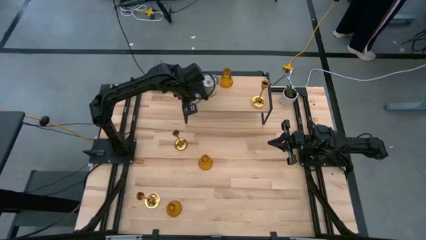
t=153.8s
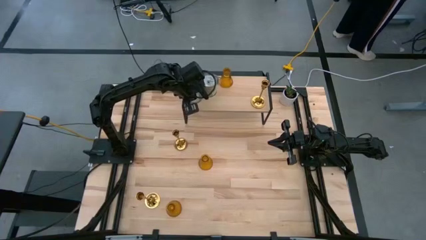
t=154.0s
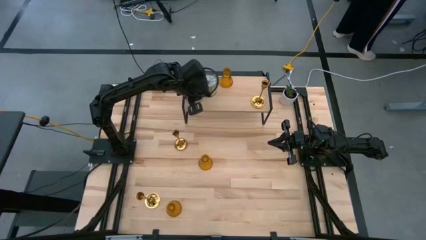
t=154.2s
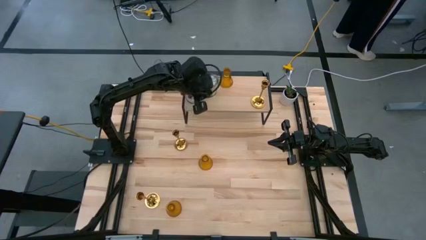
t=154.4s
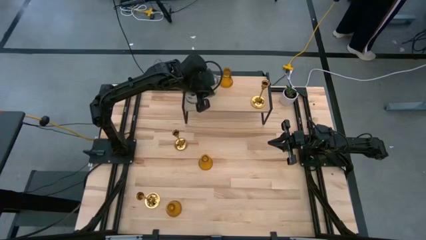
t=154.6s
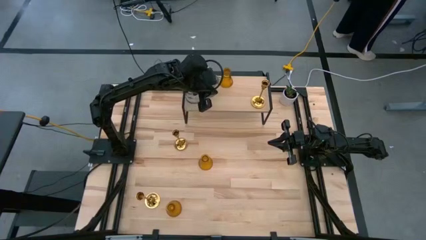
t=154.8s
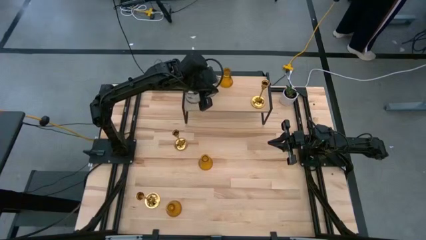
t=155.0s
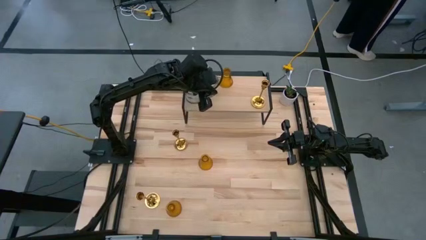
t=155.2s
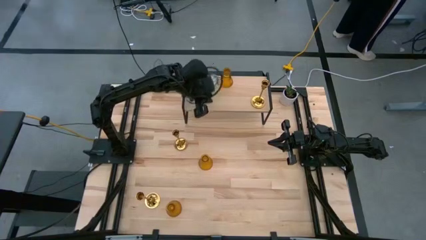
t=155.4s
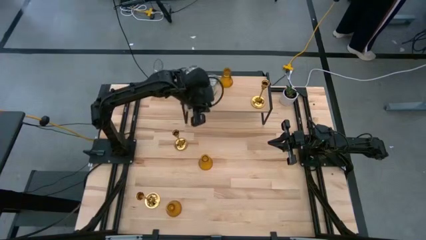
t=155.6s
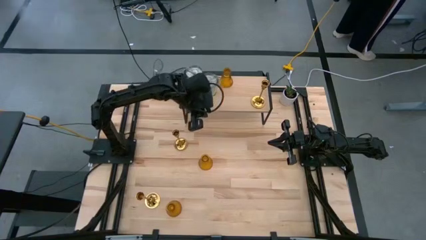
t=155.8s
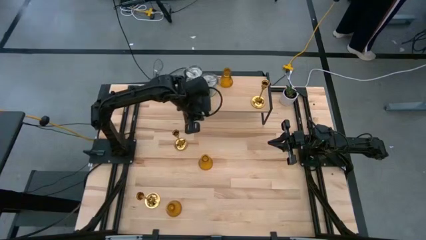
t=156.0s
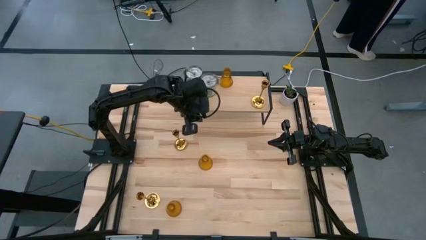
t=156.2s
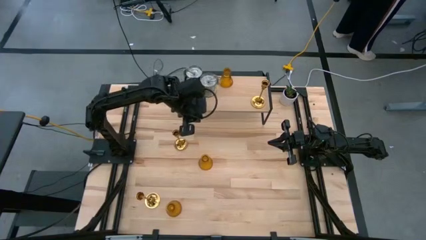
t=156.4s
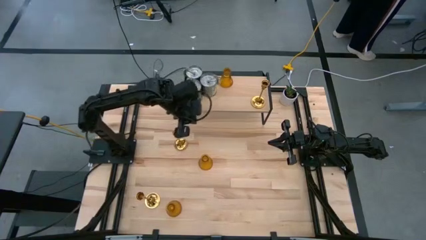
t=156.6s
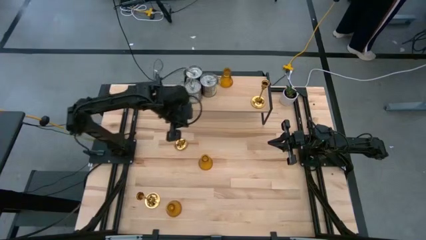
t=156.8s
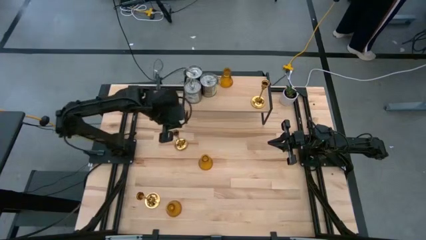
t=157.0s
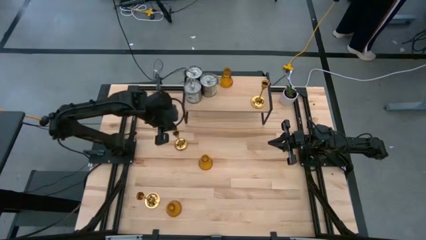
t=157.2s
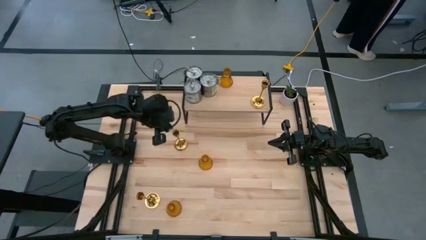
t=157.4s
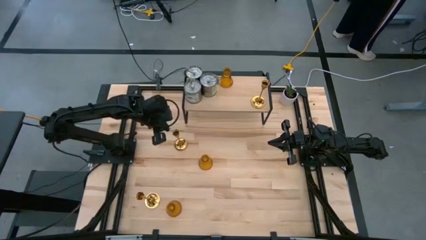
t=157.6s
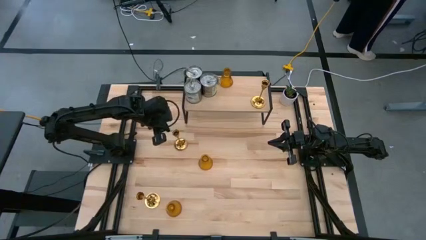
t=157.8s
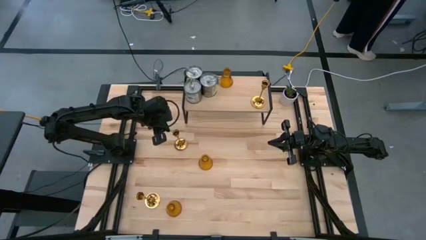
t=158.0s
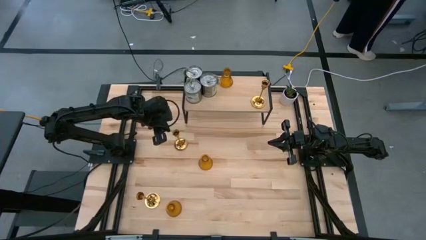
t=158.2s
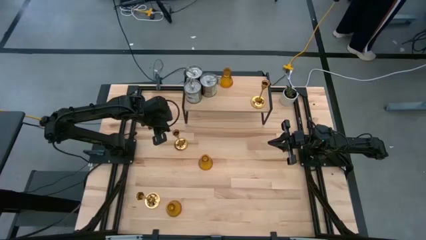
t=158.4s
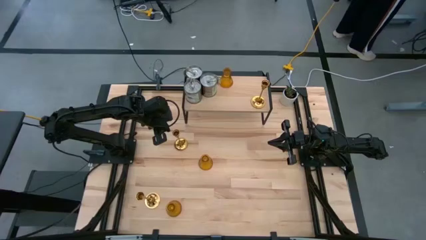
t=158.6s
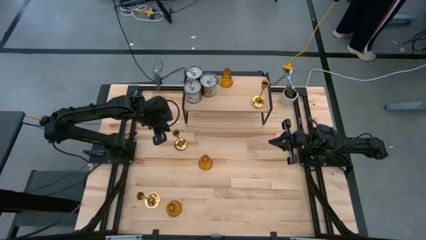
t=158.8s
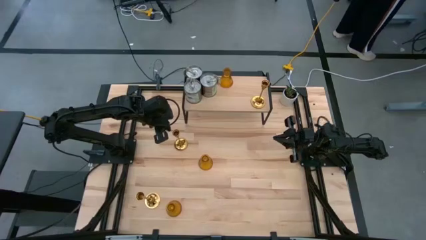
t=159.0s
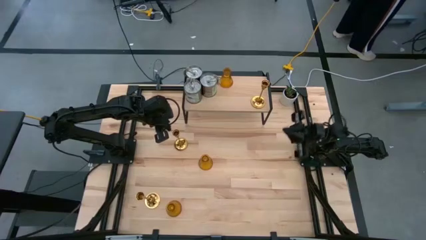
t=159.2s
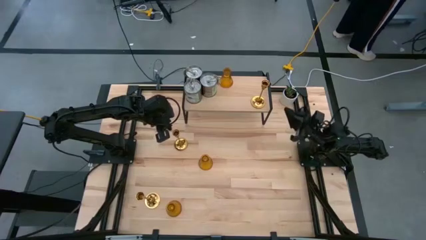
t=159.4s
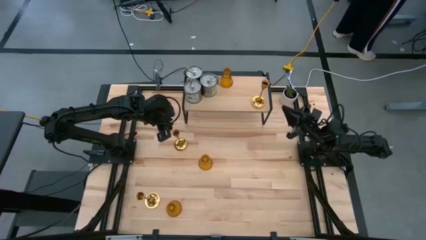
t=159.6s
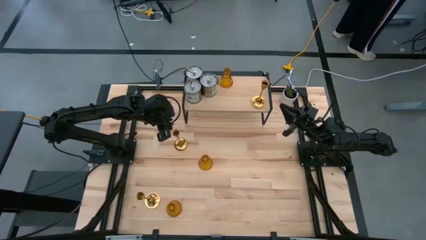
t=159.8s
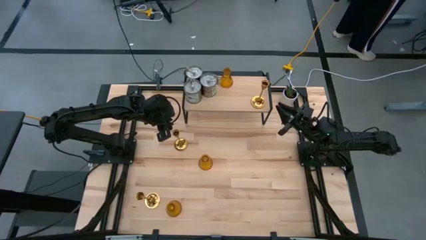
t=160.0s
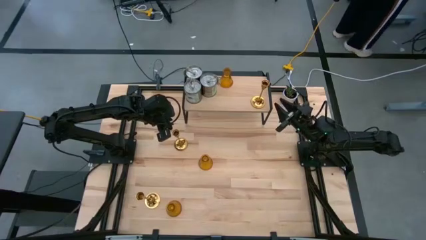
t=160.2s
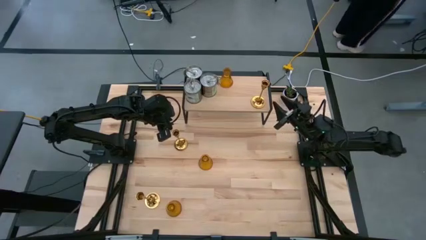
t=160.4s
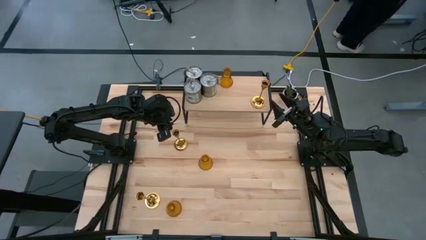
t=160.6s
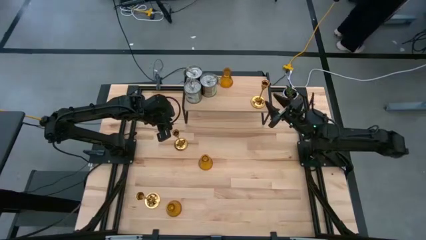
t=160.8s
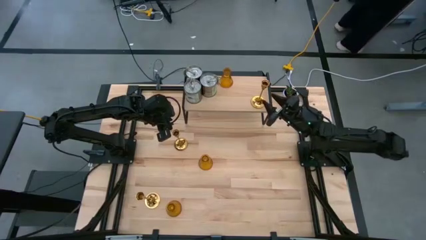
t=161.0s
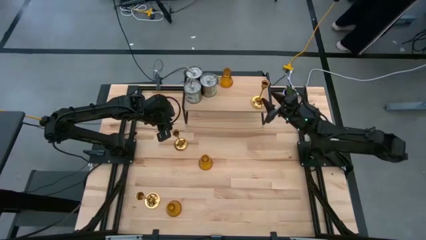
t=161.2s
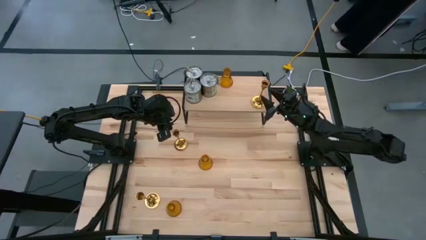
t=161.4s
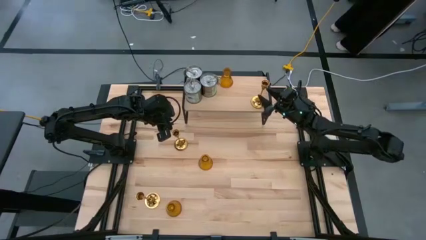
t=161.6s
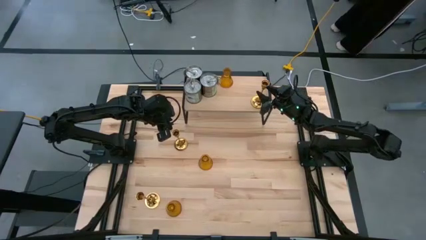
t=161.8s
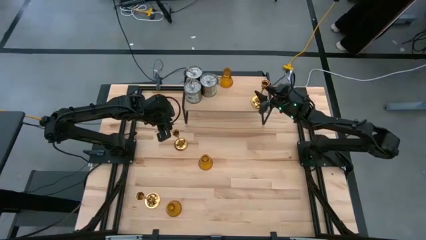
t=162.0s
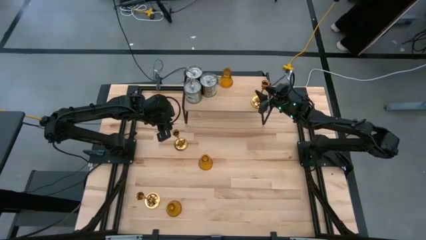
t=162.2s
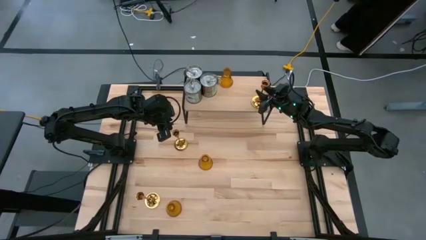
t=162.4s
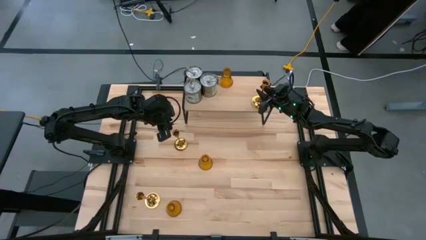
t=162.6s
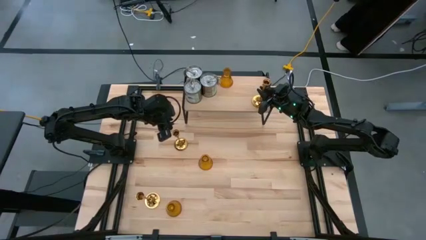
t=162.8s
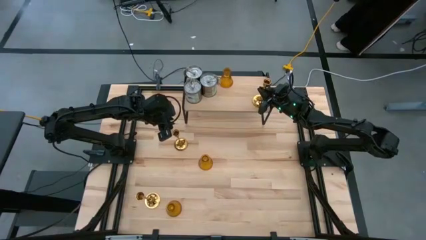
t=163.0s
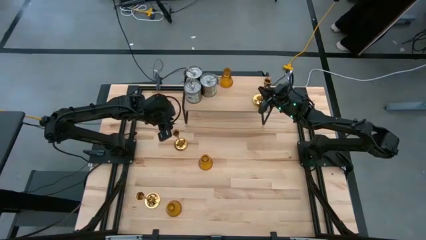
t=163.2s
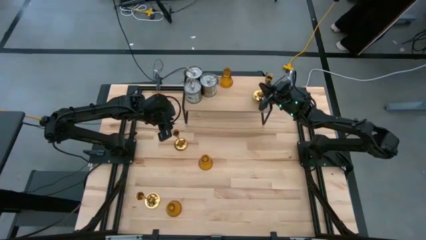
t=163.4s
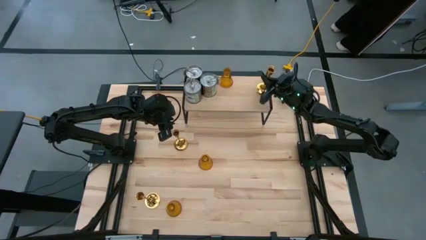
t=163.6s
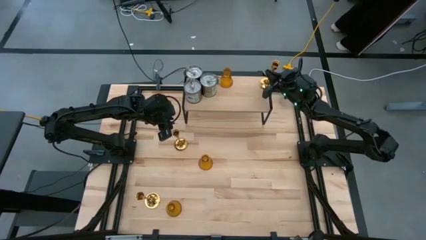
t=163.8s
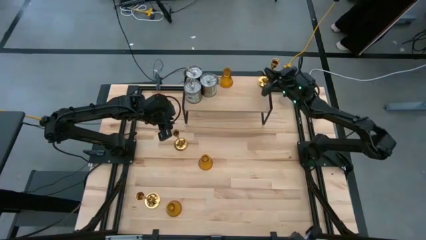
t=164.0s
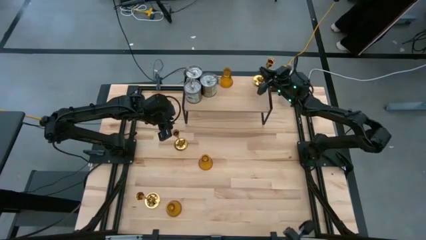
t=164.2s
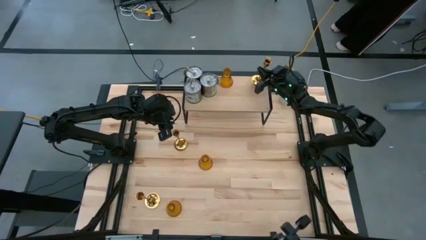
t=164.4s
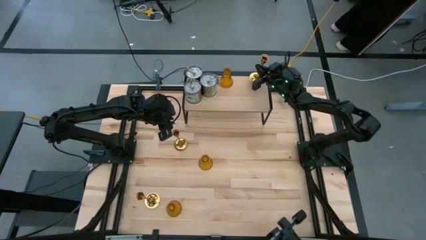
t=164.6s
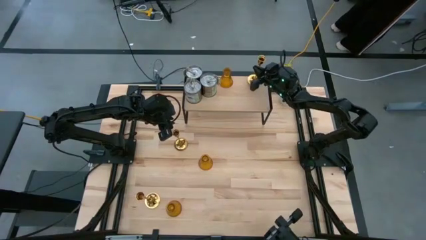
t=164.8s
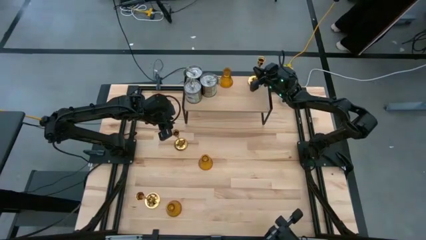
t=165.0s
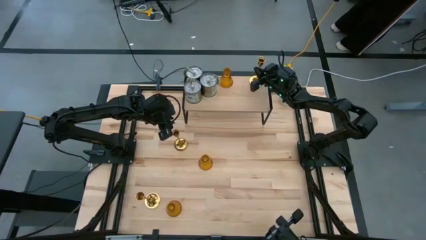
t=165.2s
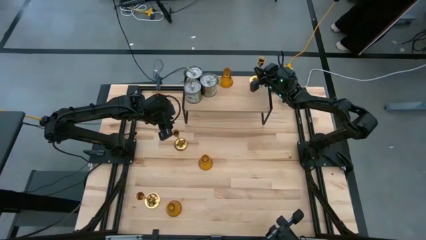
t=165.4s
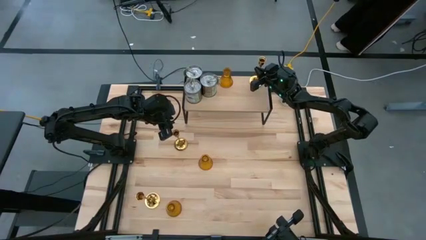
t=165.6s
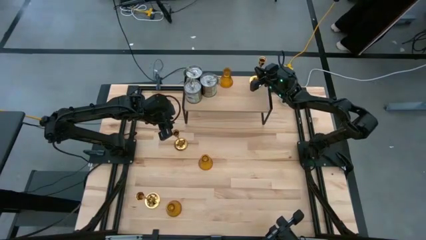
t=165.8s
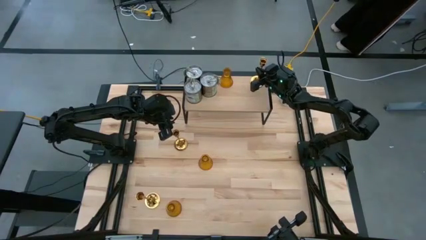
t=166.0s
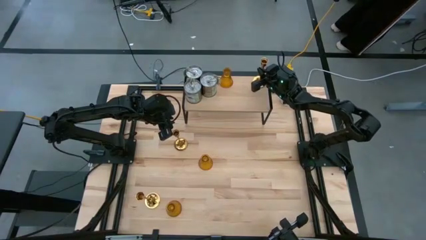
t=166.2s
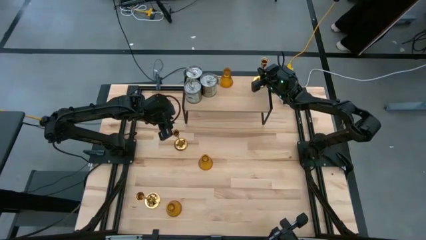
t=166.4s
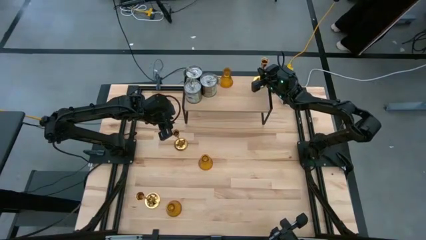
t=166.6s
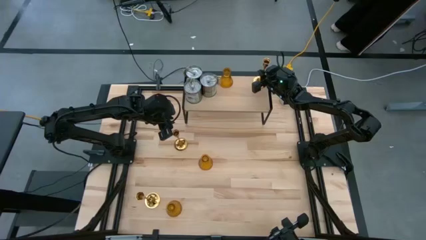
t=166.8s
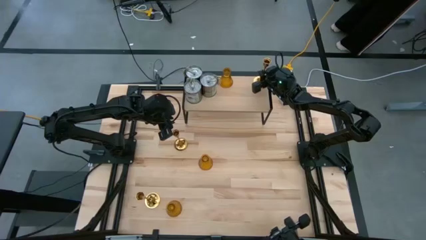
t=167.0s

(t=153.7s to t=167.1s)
Task: Pick & Place candle stick holders
Adjust the gold candle holder on the shelf

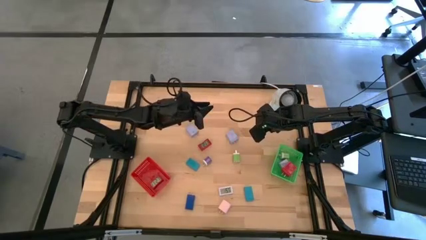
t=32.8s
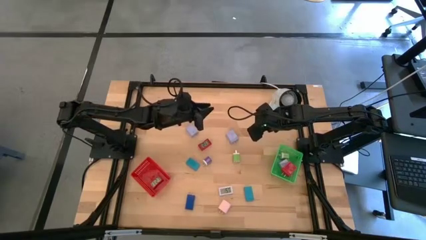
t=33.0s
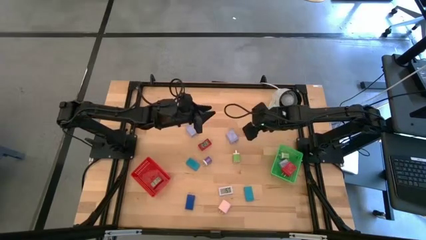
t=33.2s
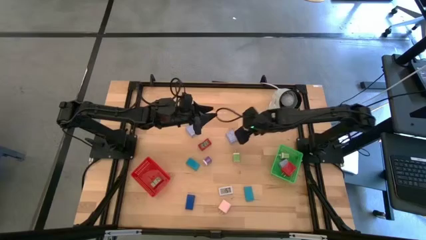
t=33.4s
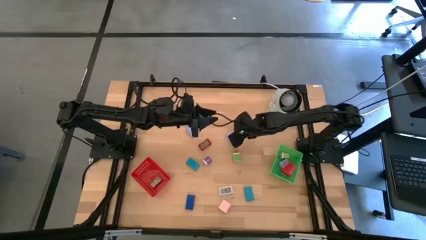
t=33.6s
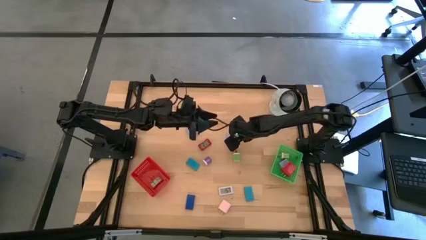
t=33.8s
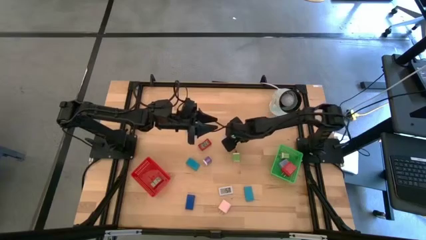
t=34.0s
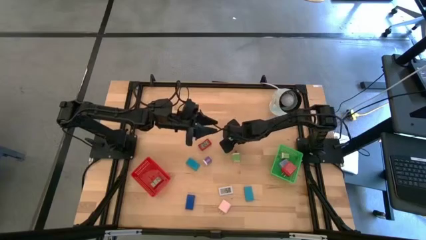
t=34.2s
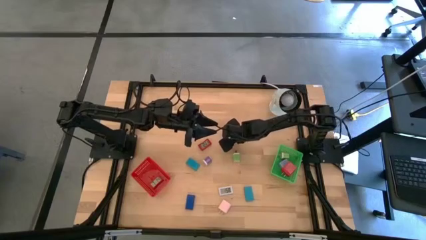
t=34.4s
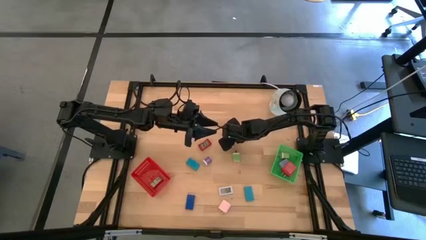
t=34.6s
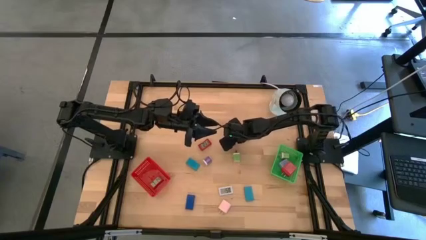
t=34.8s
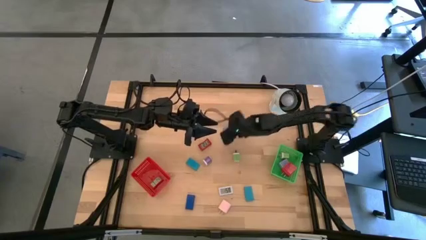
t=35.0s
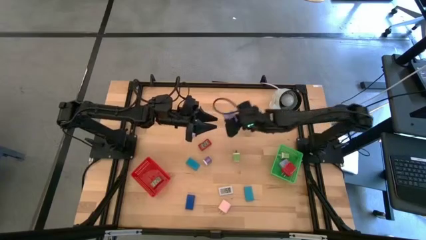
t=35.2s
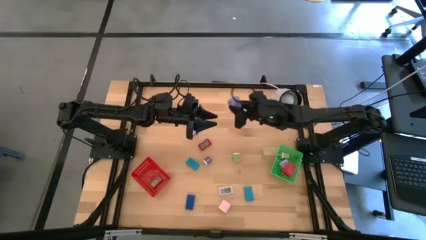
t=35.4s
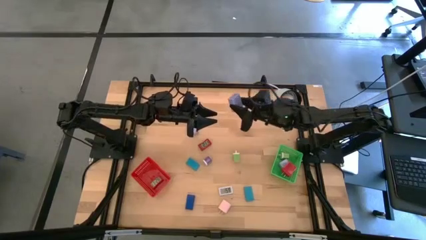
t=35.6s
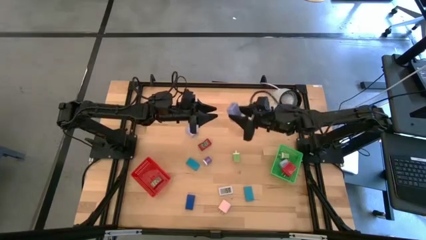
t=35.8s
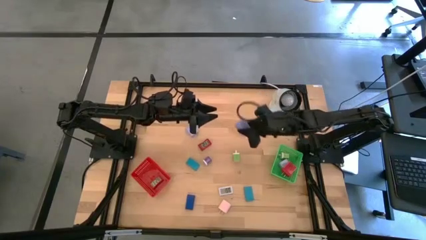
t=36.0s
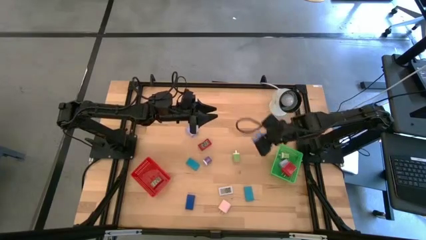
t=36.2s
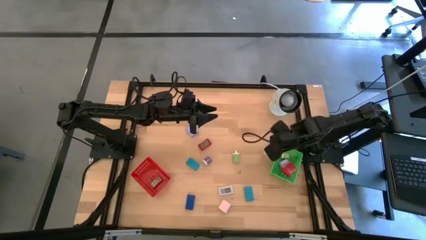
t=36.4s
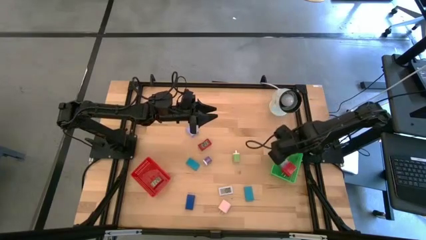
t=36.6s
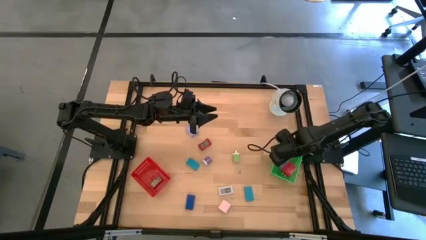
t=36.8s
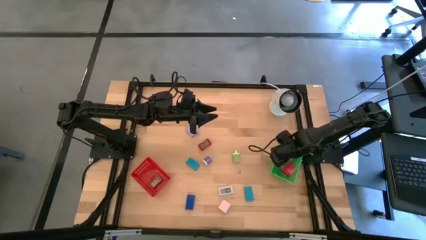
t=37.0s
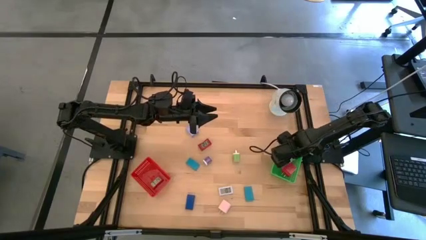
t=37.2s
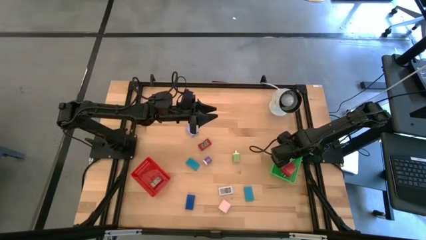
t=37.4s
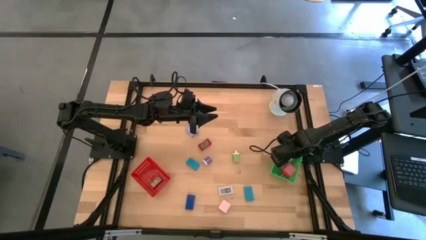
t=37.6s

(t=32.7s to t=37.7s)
Task: Pick & Place Office items
Put the top light blue power adapter into the green bin
